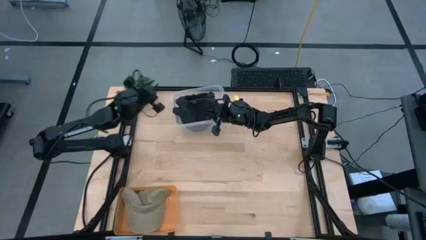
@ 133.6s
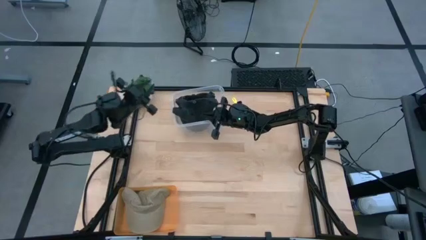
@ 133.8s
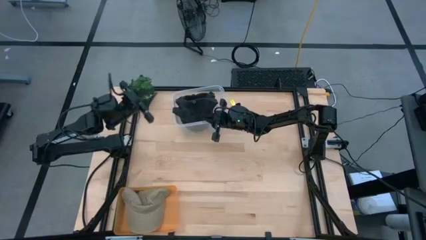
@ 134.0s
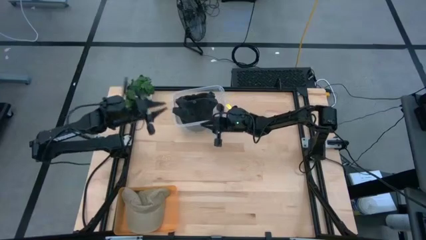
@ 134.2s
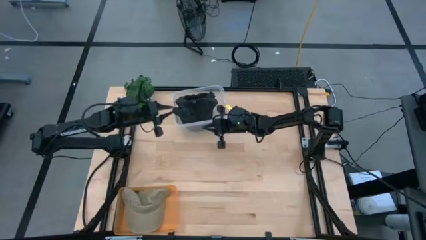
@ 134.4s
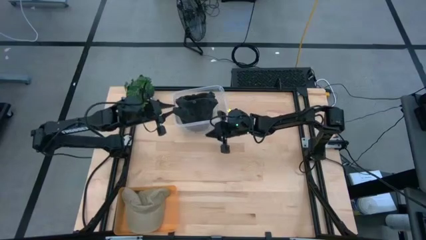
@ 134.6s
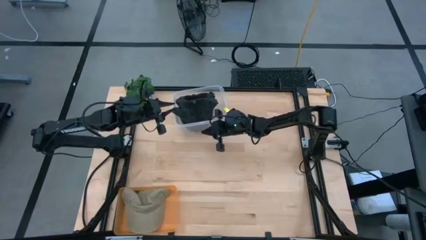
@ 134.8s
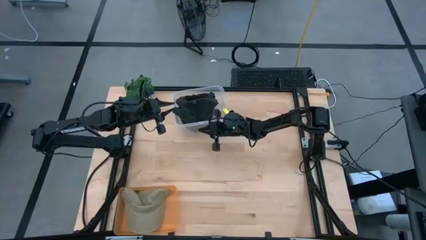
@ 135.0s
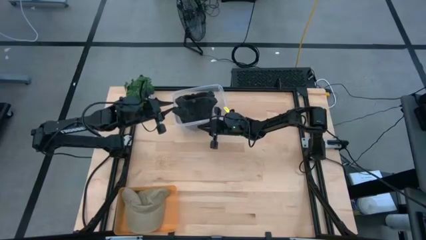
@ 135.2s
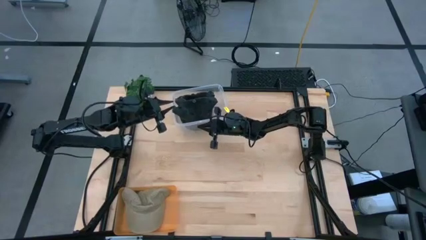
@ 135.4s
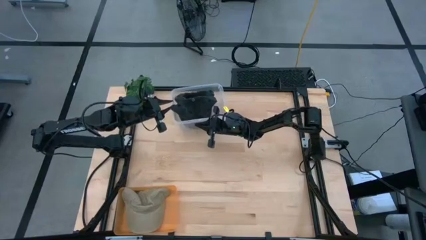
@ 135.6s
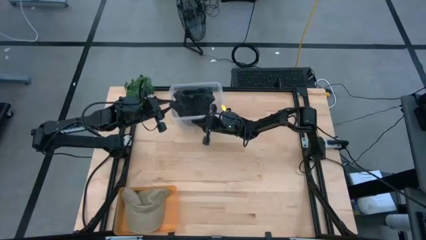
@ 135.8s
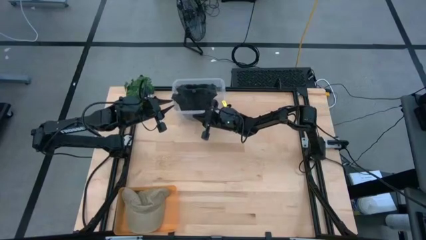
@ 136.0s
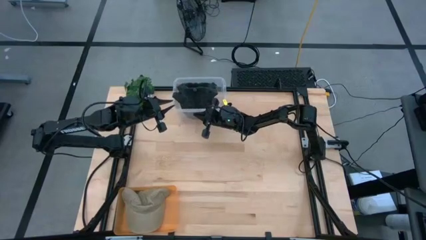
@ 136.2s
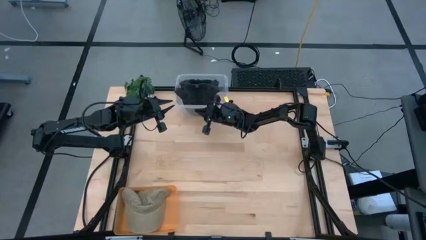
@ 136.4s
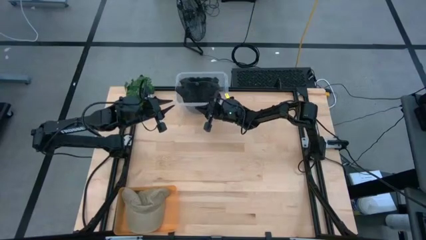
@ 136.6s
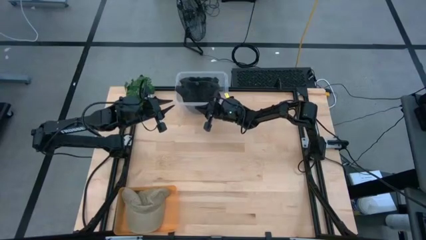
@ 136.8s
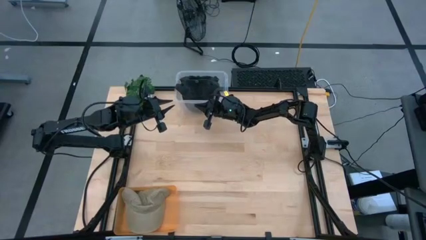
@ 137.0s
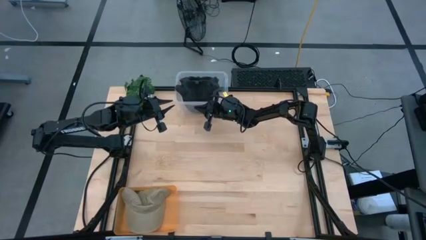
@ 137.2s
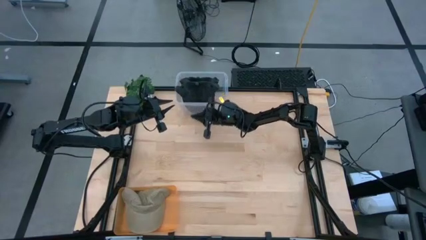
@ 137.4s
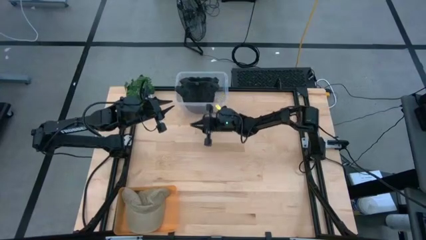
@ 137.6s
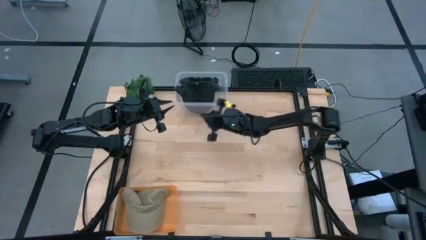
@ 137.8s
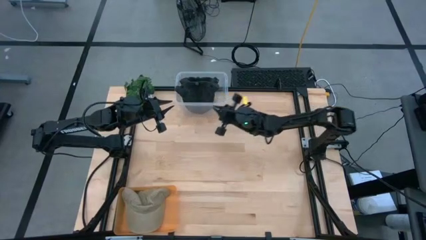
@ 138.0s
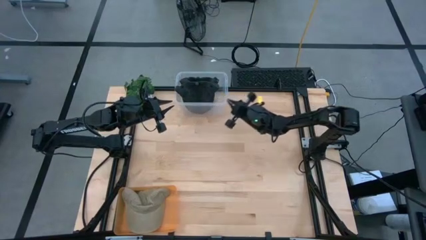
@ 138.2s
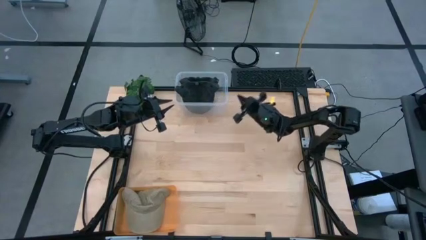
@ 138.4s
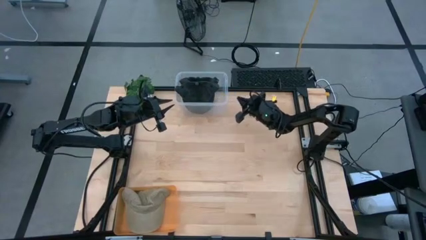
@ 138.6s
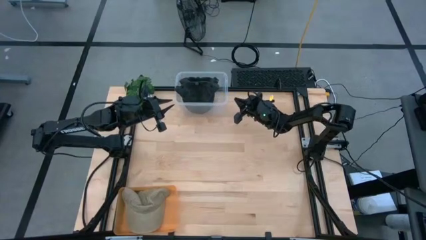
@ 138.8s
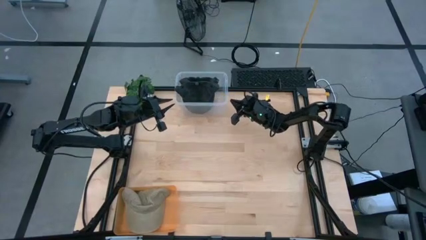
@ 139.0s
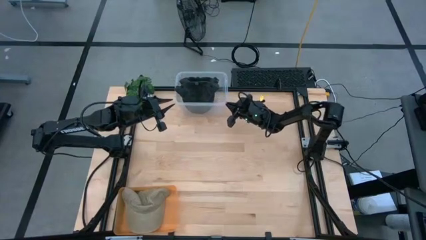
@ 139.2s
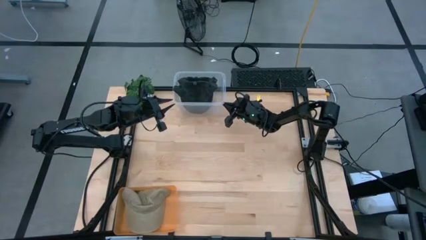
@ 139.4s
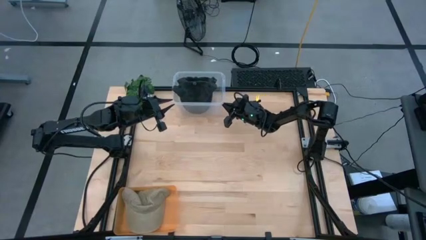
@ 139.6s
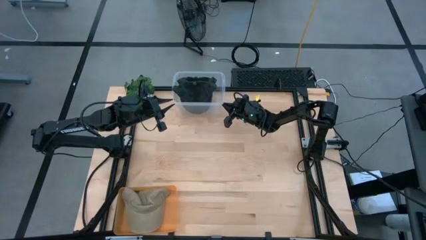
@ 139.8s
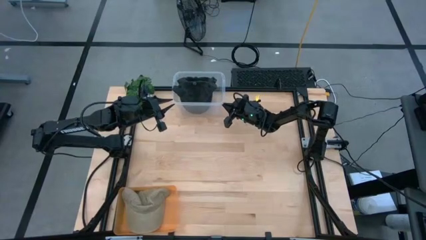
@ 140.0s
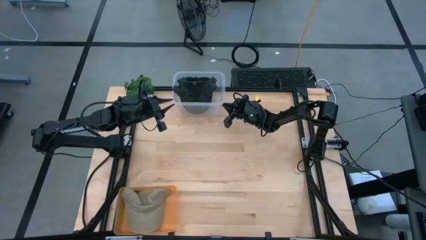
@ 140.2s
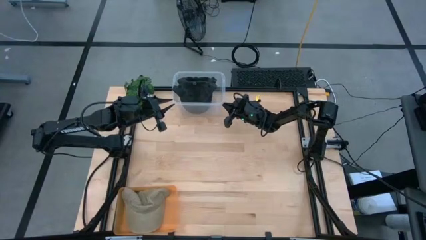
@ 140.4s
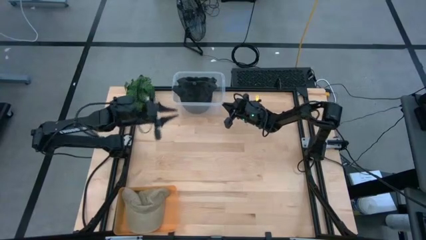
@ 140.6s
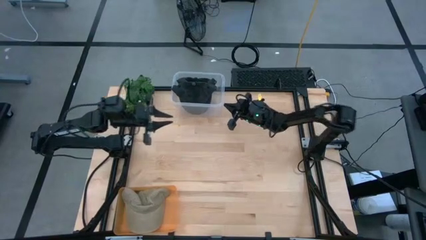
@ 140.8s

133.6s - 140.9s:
Task: Pick & Place hat
Adjust the transparent bin

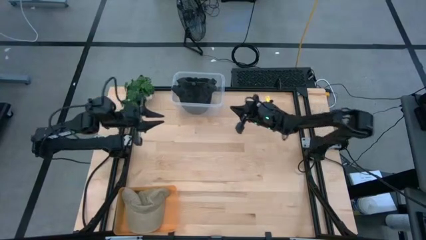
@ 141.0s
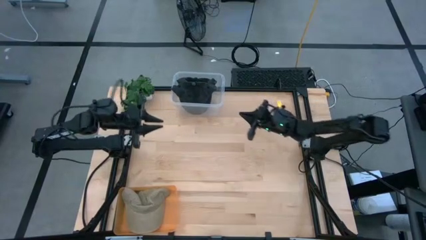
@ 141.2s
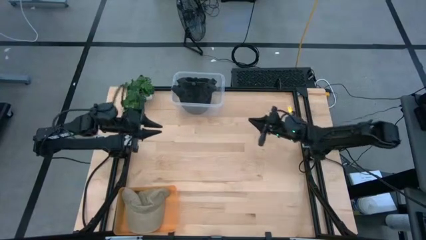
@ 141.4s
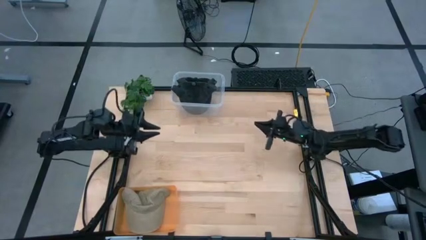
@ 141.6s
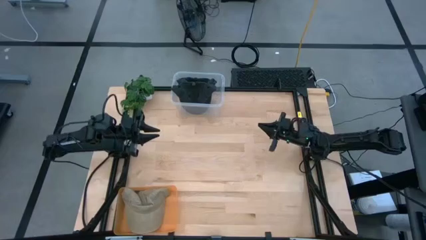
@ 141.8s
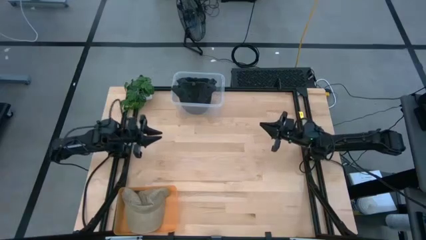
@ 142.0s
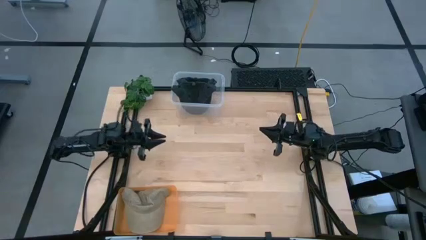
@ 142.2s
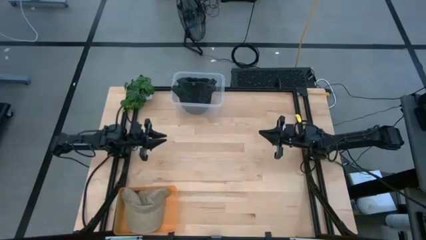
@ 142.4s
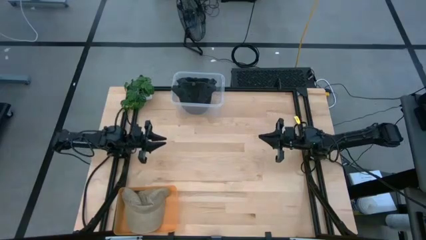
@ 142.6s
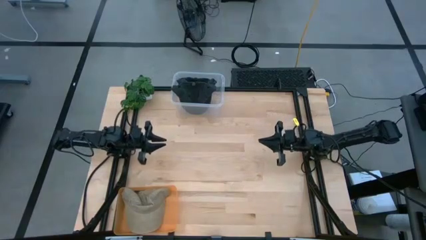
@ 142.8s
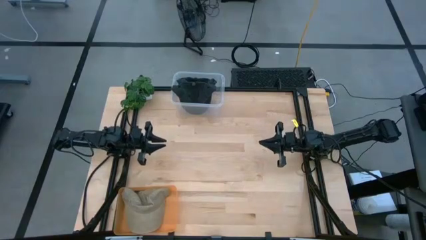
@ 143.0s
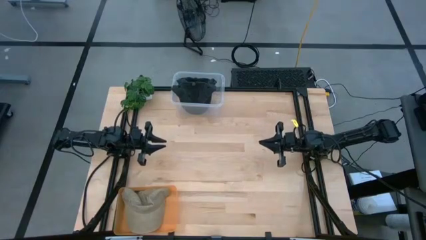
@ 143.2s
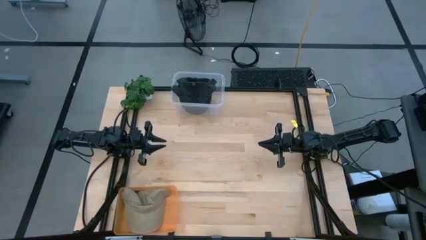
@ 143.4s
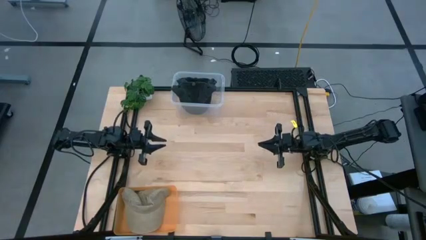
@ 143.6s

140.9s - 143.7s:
Return to Home Position
